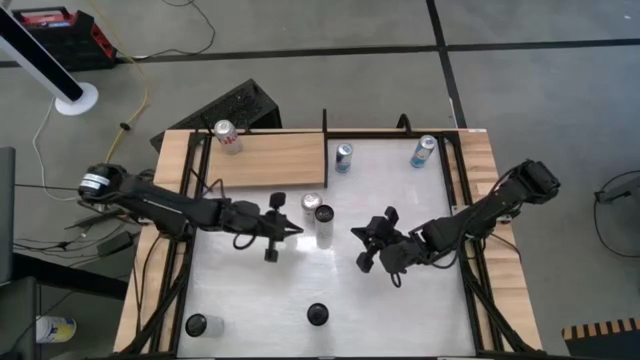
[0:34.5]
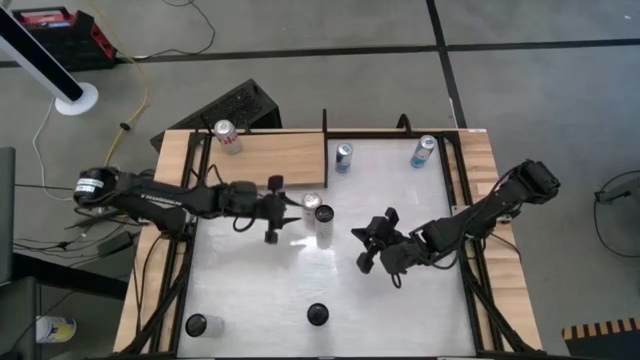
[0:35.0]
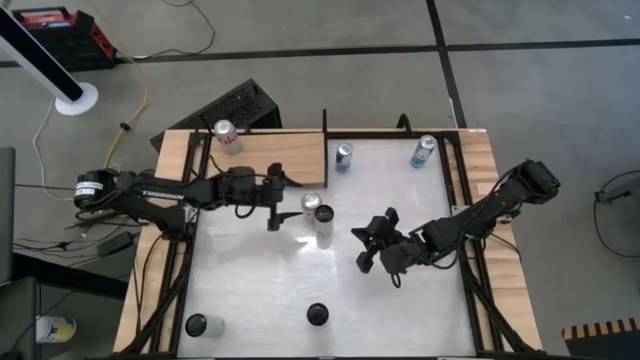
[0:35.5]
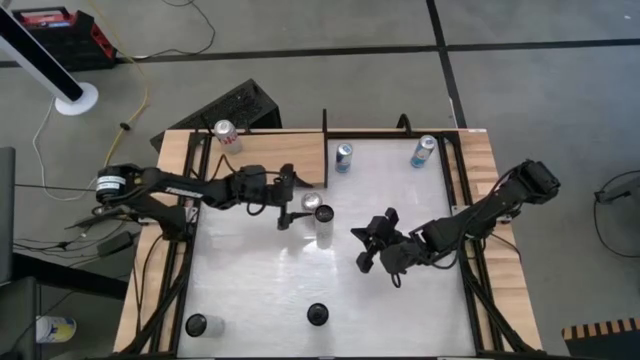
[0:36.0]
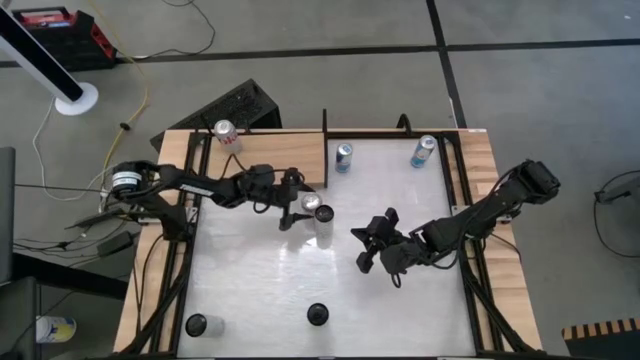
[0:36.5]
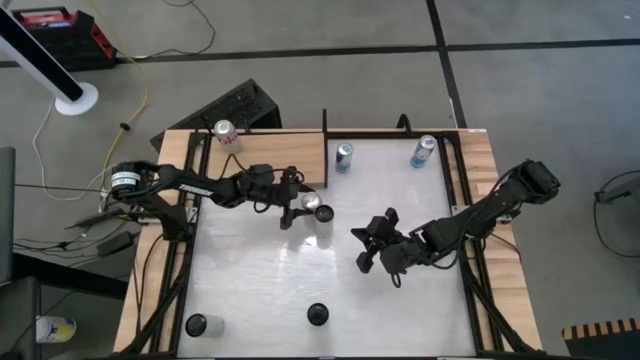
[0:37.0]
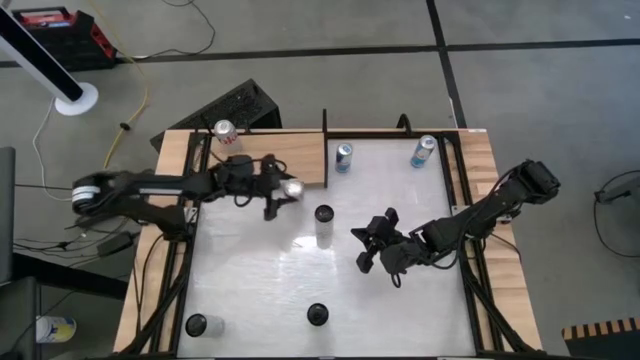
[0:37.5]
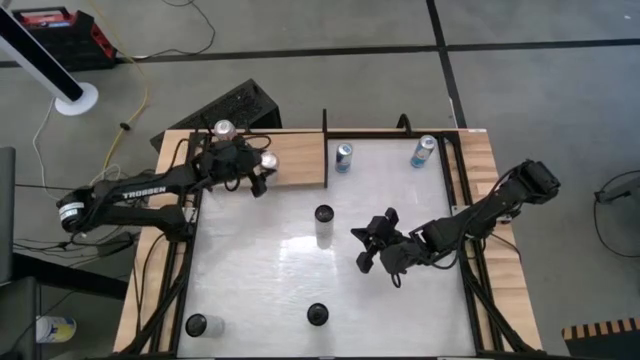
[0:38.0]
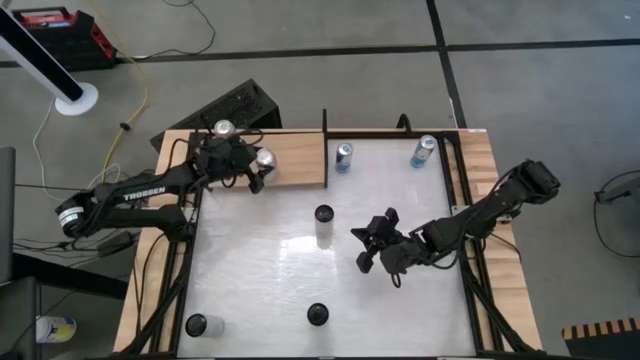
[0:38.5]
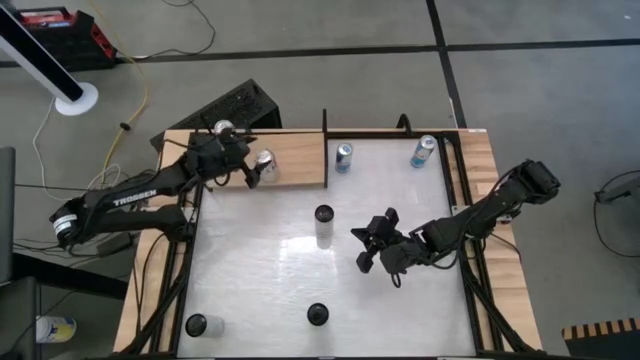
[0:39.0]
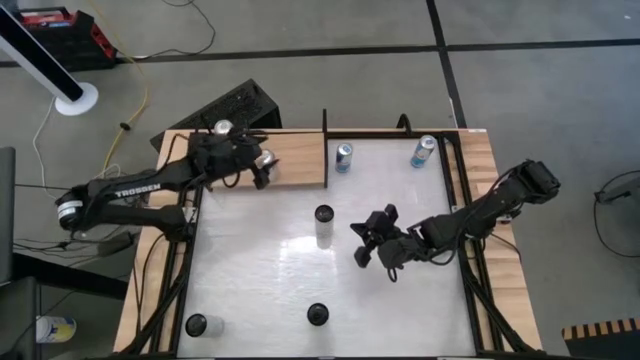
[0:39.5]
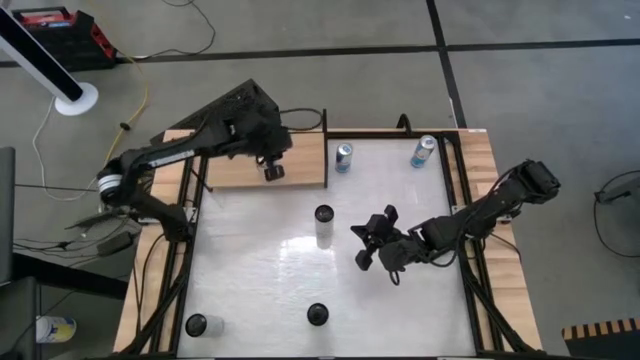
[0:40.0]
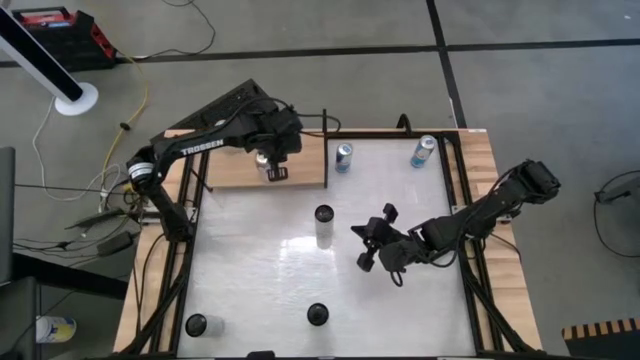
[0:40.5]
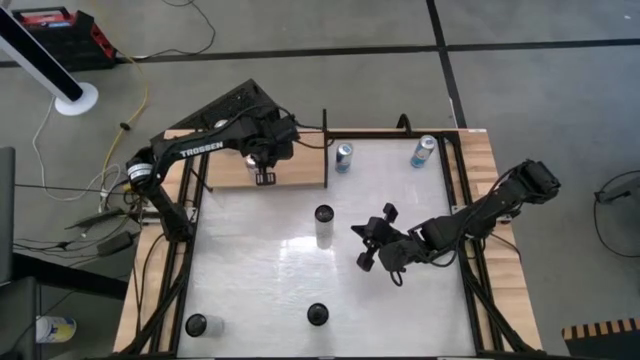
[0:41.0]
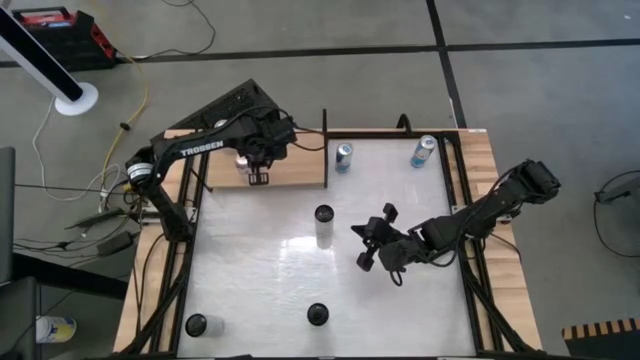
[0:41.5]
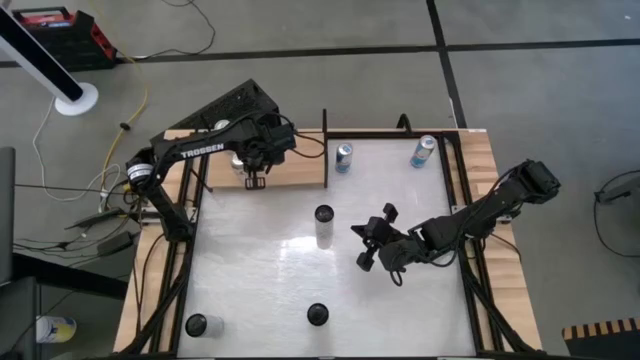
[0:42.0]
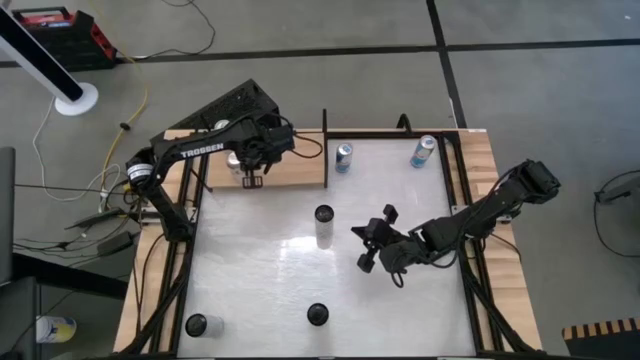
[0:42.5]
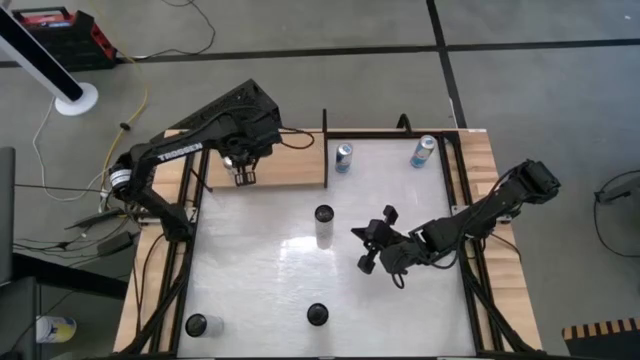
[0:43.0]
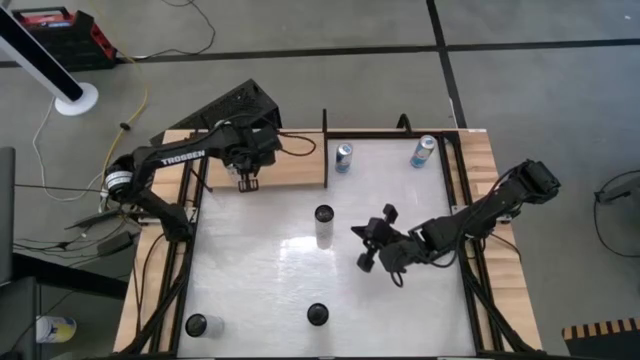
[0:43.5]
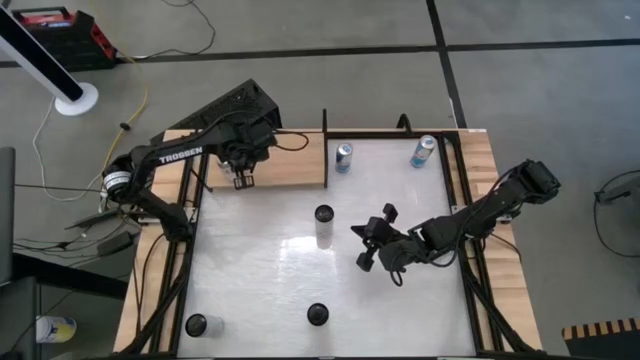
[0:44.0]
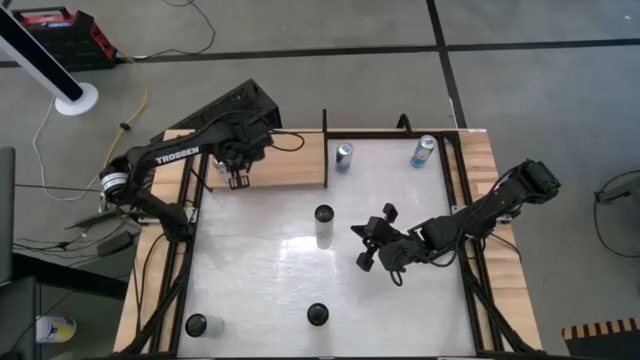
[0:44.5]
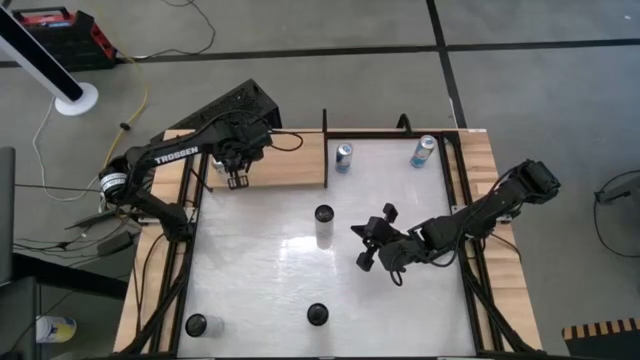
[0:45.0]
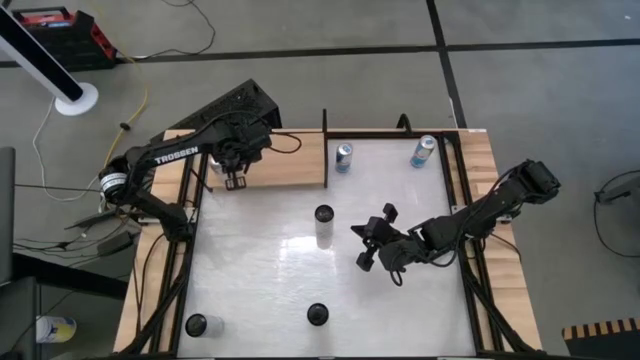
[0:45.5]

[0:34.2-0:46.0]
Task: Place canned beverage on shelf
Put the red and silver soda can aligned with the other red and silver soda can on the shelf

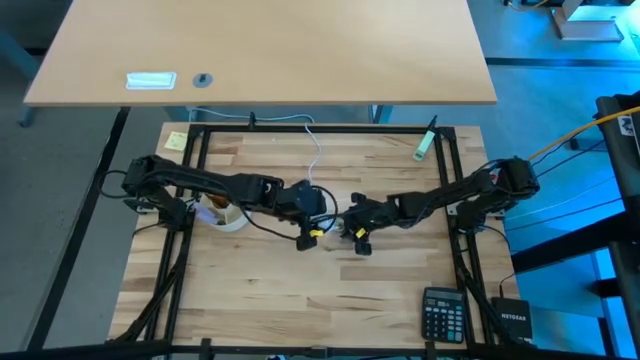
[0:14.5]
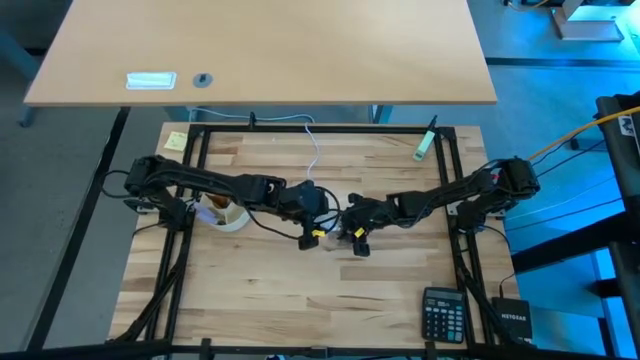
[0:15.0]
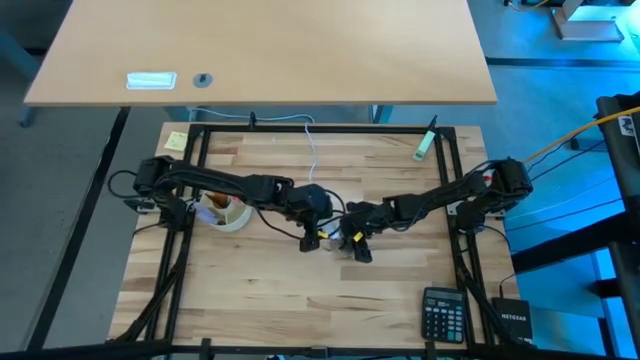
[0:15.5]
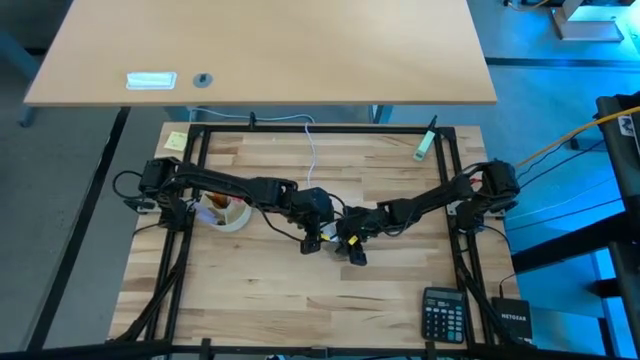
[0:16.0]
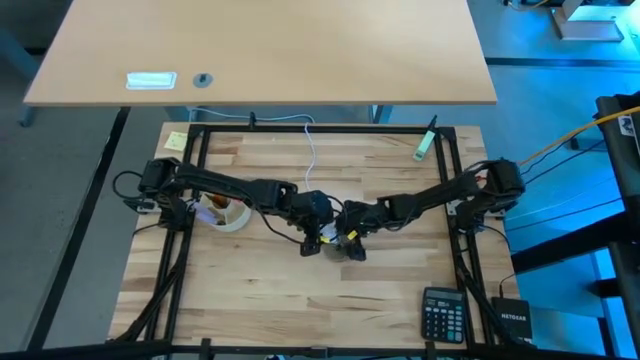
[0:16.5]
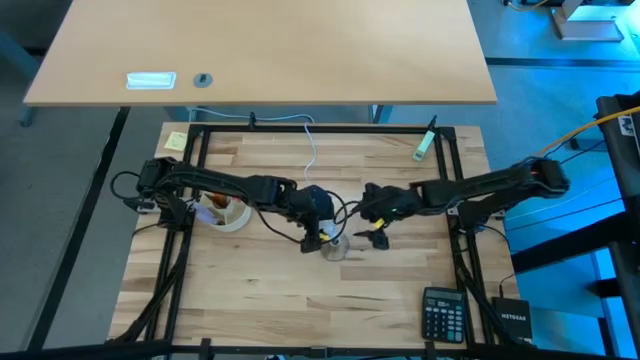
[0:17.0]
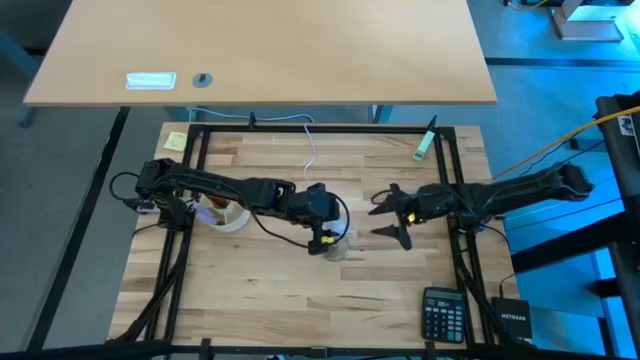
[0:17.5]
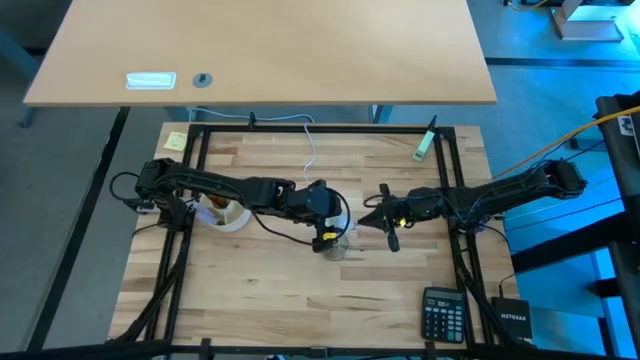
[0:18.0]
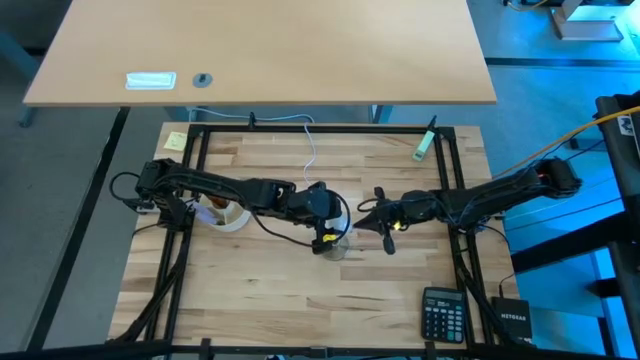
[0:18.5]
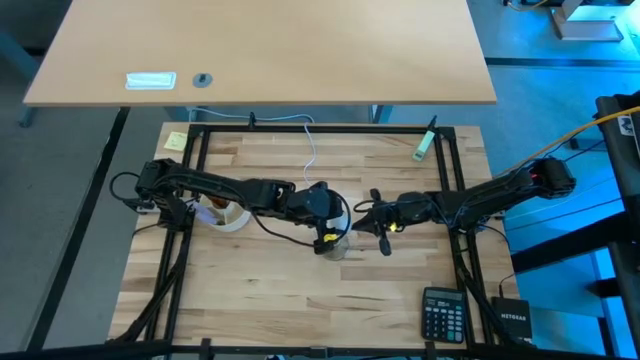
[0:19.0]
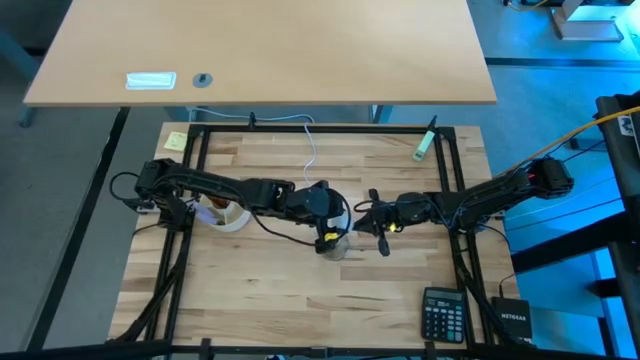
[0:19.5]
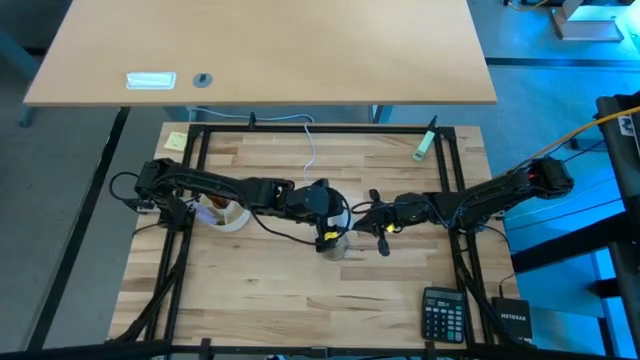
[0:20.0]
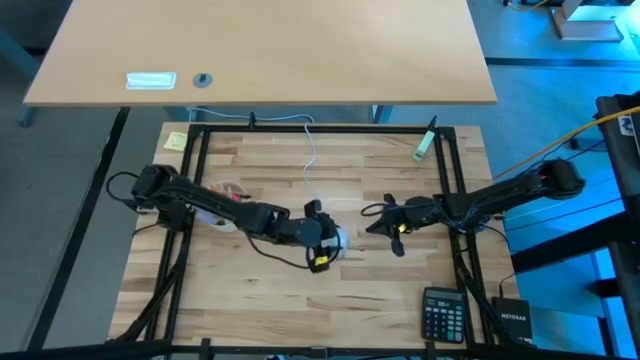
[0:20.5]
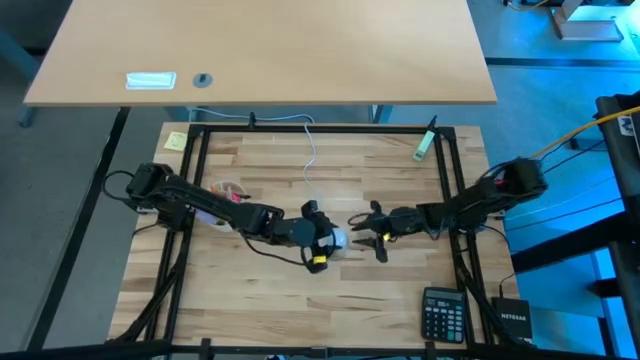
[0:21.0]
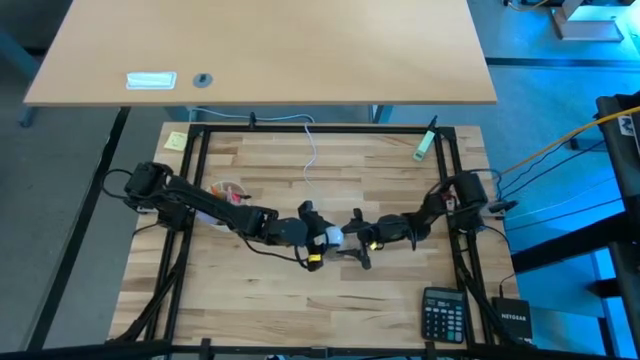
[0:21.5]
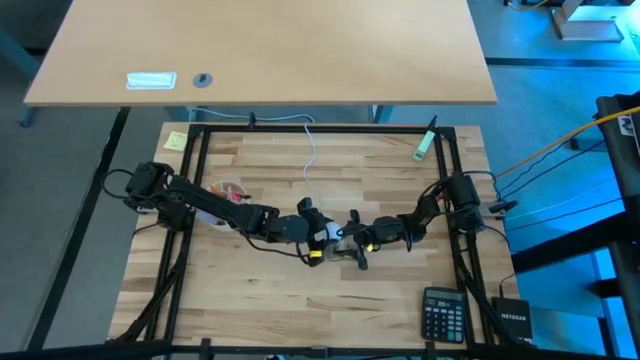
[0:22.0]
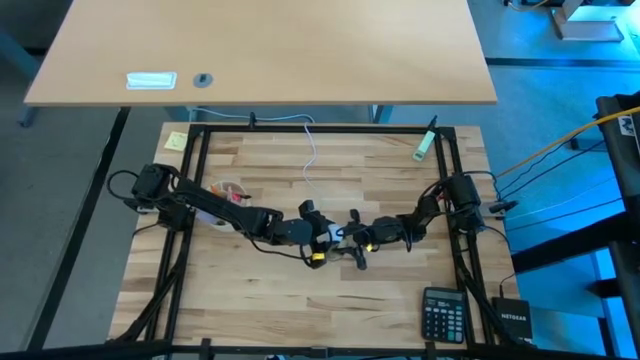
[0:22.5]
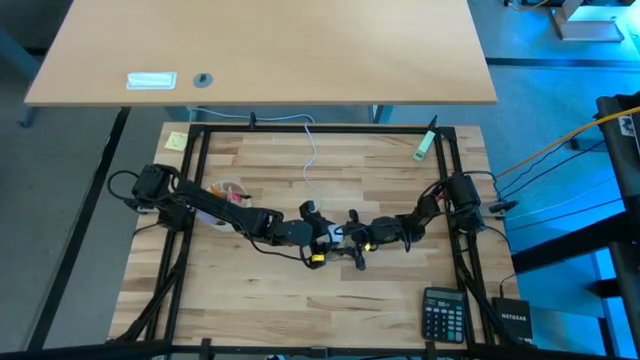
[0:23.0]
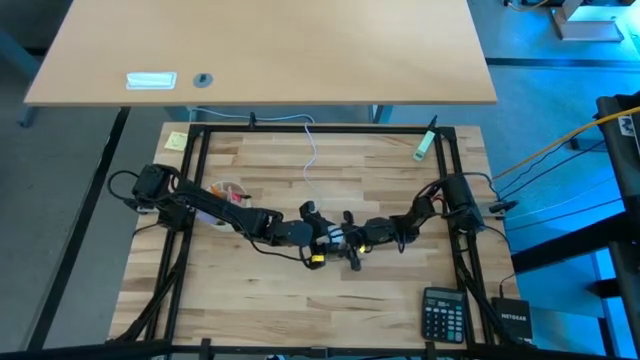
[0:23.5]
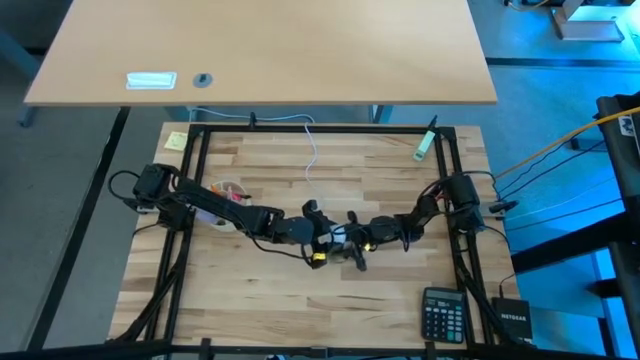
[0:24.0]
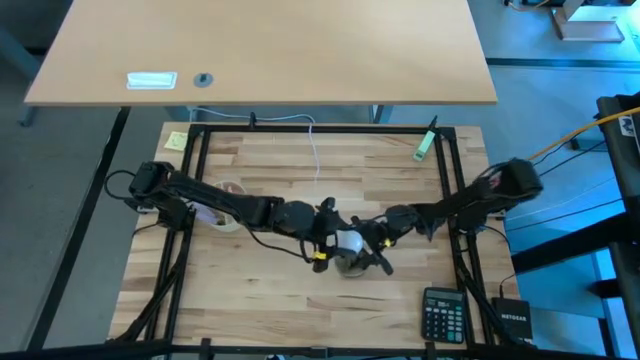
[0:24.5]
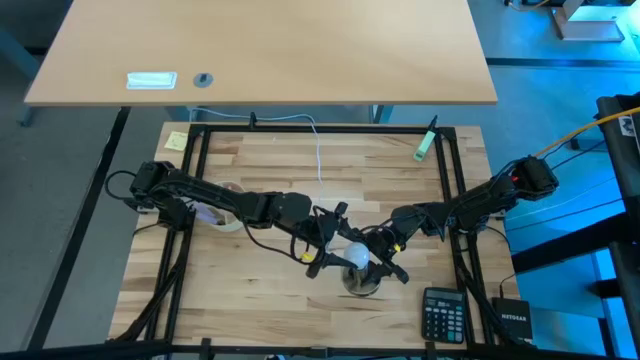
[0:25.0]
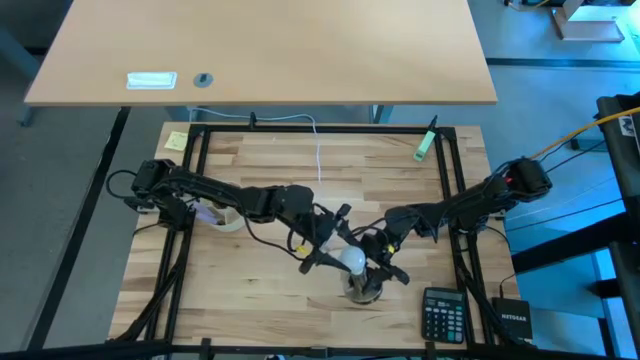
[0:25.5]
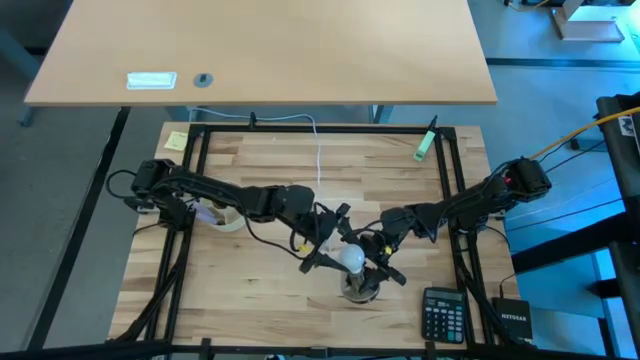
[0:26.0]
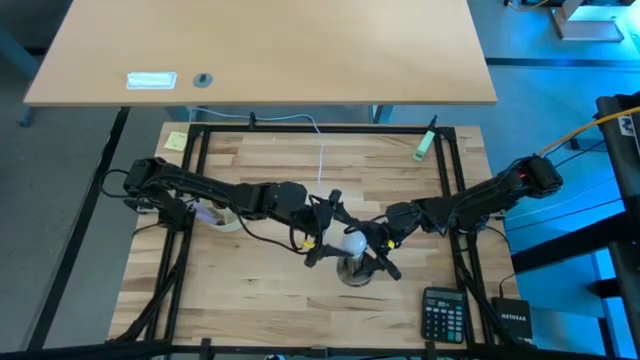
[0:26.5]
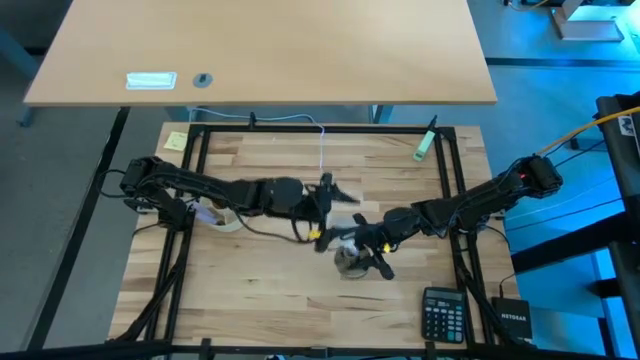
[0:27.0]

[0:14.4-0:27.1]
Task: Screw lightbulb
Insert the lightbulb into the lamp
